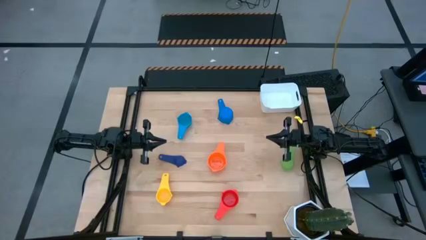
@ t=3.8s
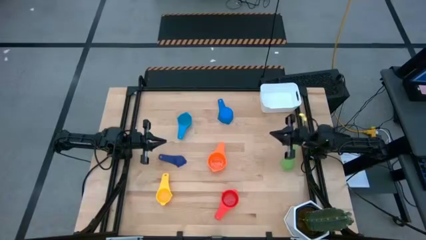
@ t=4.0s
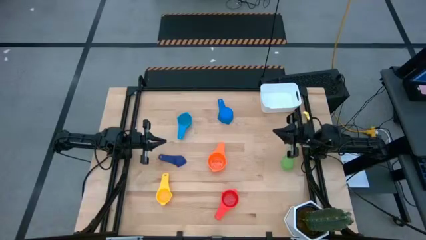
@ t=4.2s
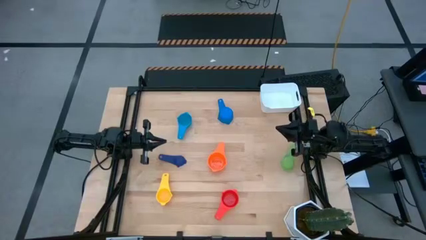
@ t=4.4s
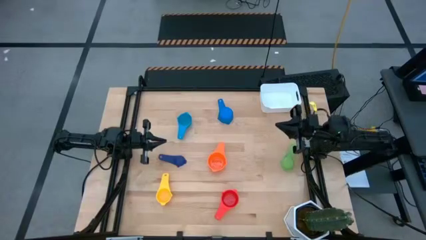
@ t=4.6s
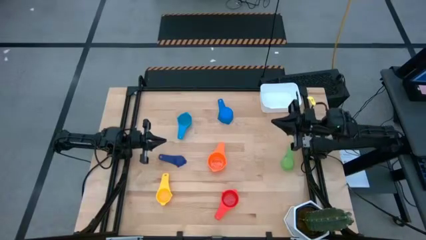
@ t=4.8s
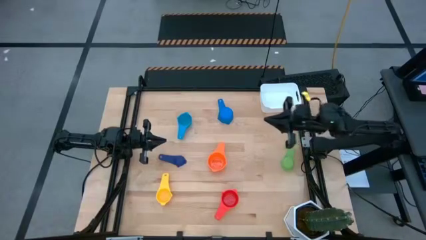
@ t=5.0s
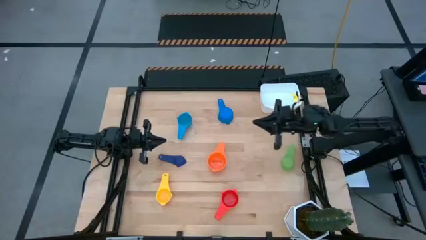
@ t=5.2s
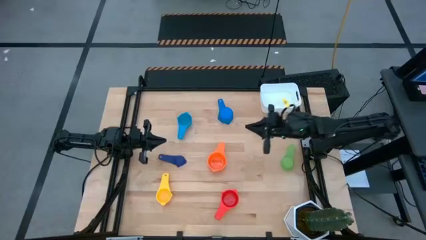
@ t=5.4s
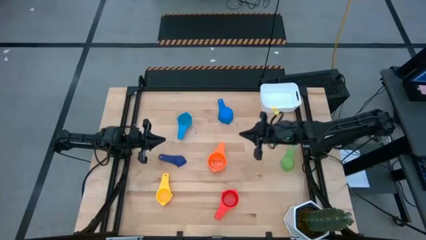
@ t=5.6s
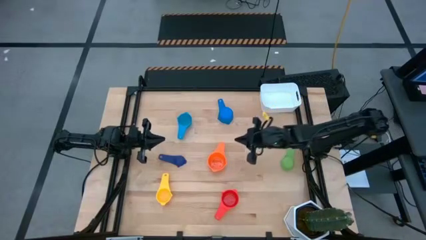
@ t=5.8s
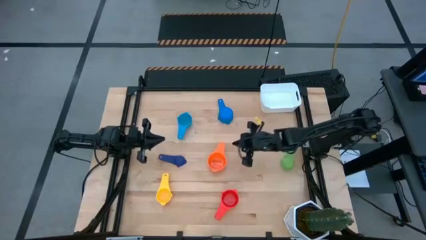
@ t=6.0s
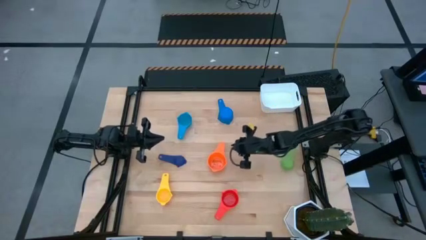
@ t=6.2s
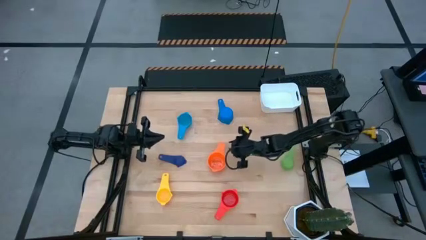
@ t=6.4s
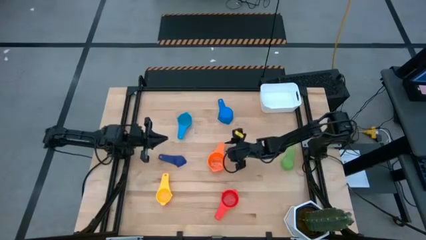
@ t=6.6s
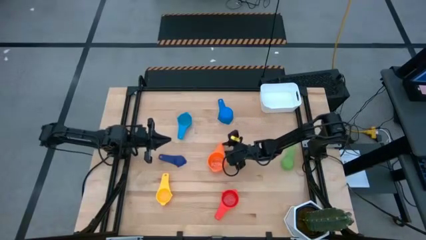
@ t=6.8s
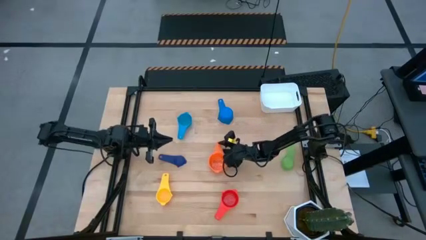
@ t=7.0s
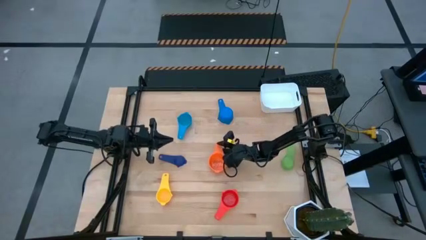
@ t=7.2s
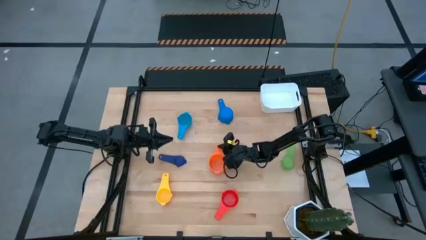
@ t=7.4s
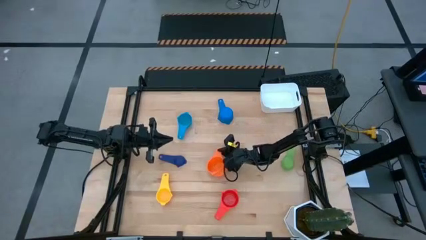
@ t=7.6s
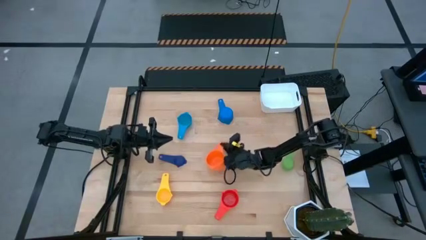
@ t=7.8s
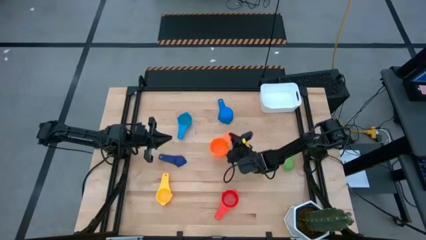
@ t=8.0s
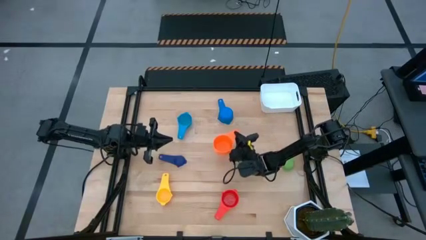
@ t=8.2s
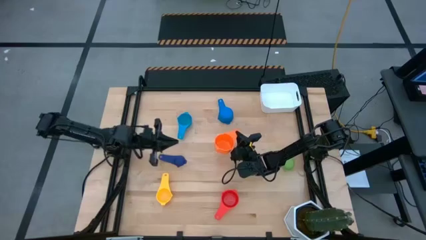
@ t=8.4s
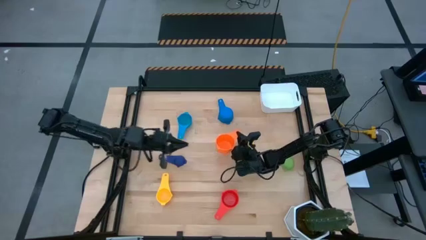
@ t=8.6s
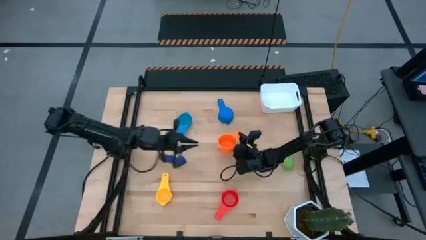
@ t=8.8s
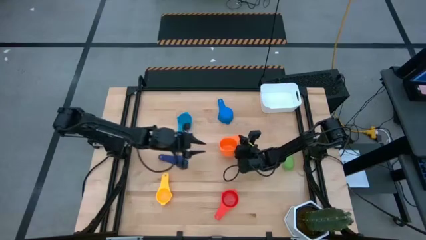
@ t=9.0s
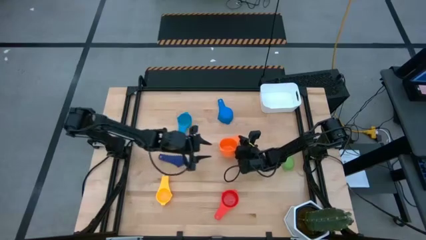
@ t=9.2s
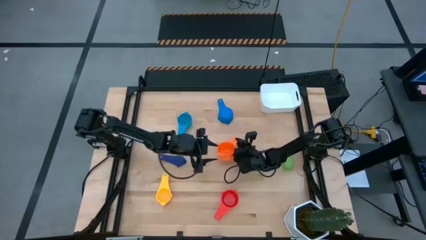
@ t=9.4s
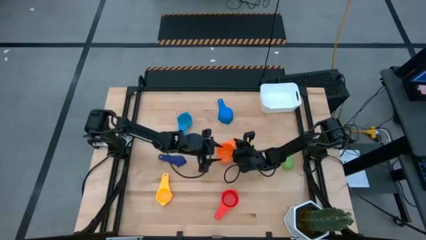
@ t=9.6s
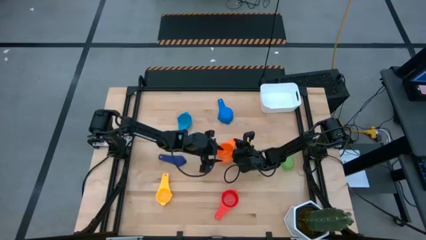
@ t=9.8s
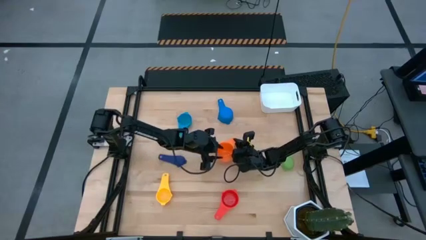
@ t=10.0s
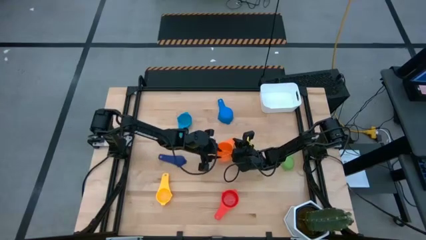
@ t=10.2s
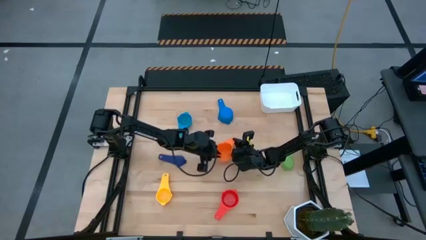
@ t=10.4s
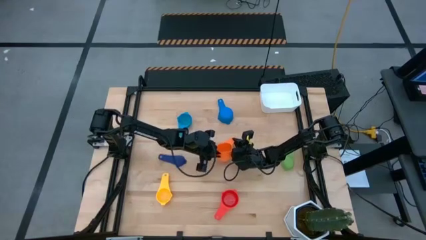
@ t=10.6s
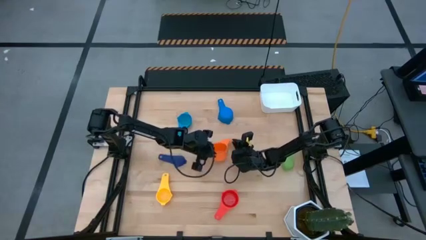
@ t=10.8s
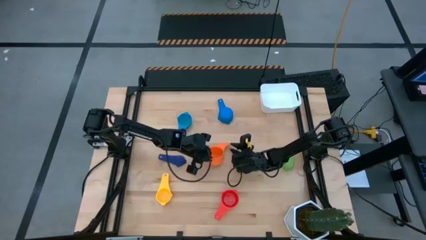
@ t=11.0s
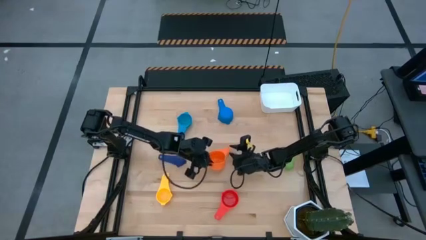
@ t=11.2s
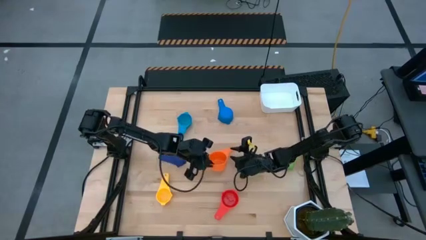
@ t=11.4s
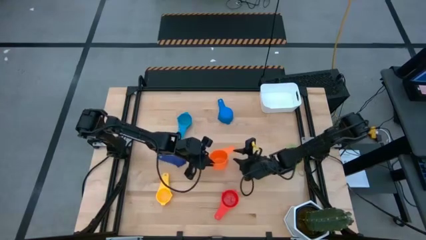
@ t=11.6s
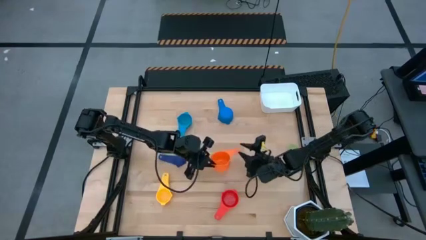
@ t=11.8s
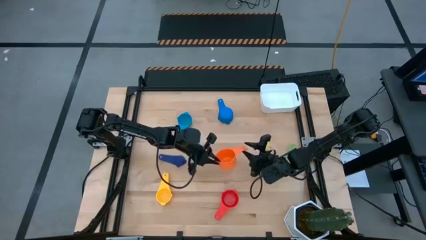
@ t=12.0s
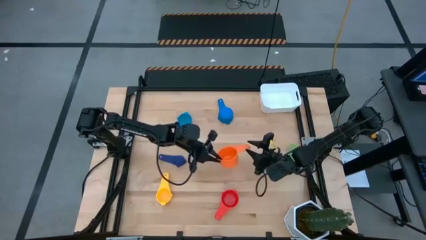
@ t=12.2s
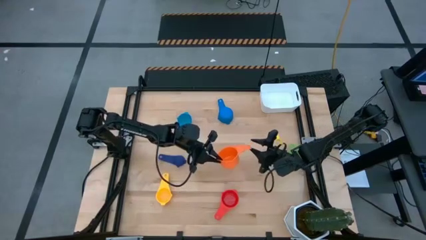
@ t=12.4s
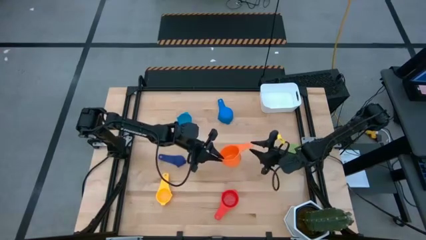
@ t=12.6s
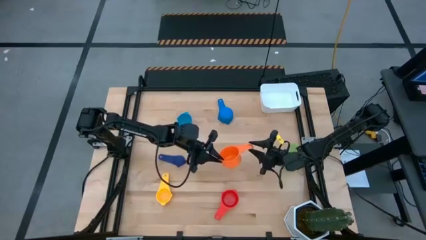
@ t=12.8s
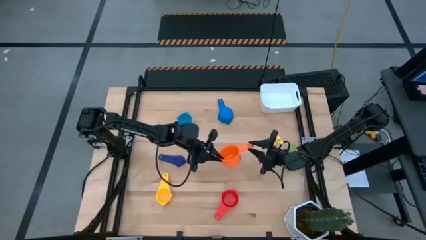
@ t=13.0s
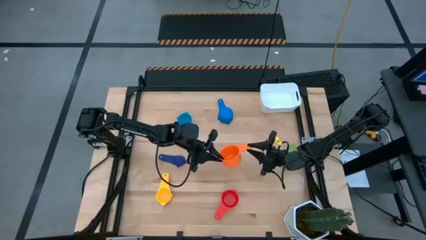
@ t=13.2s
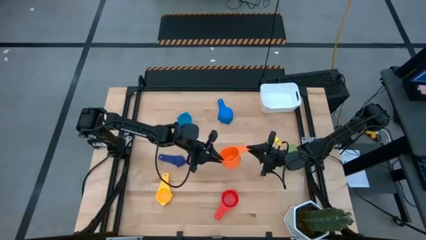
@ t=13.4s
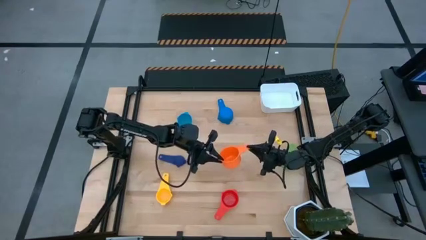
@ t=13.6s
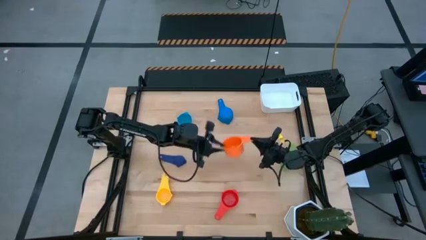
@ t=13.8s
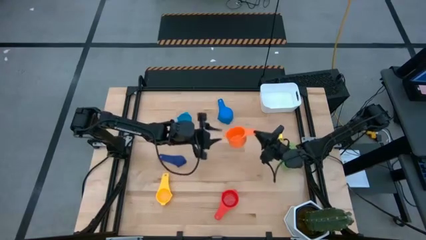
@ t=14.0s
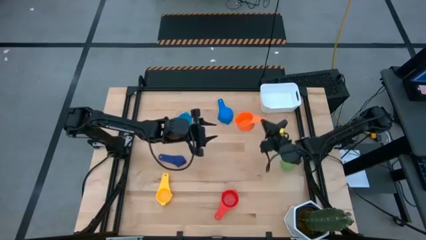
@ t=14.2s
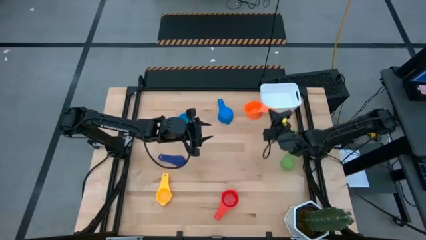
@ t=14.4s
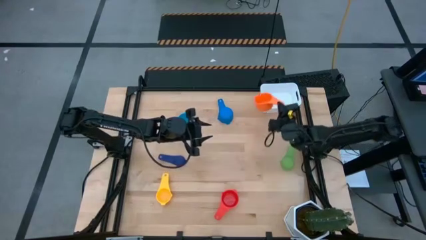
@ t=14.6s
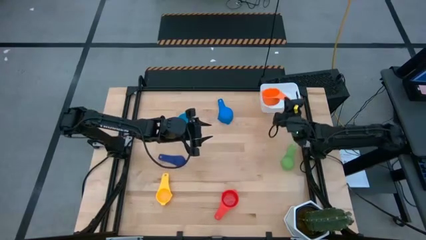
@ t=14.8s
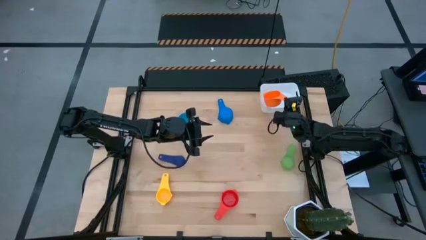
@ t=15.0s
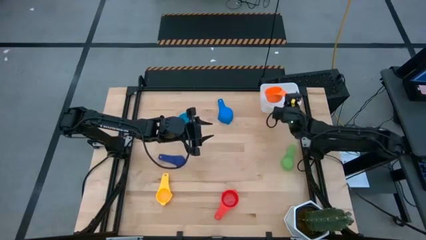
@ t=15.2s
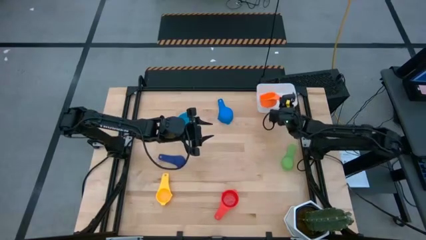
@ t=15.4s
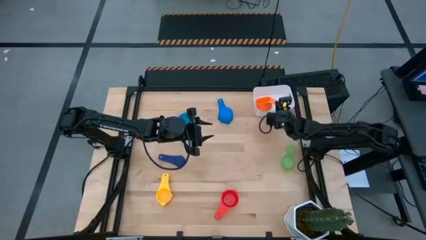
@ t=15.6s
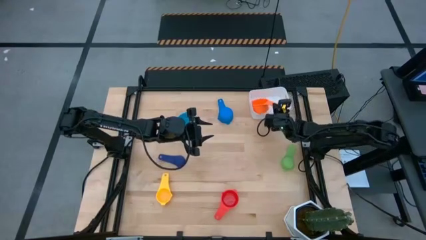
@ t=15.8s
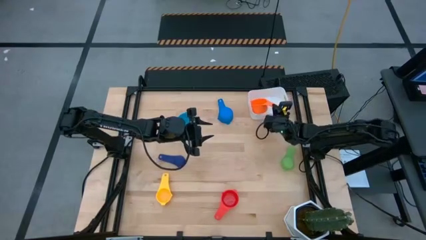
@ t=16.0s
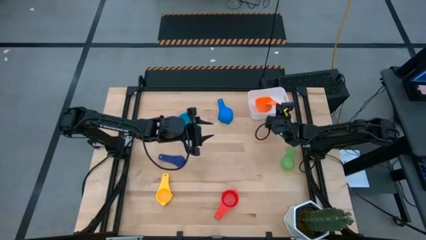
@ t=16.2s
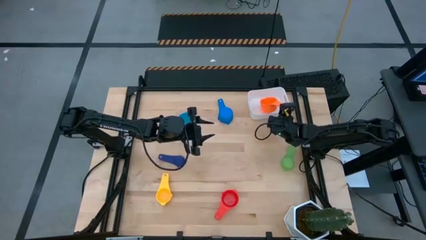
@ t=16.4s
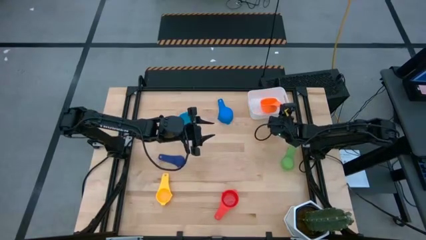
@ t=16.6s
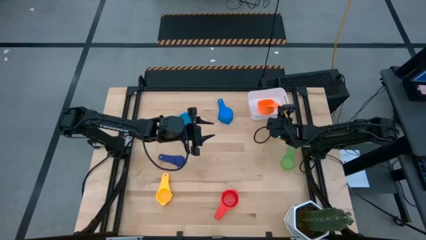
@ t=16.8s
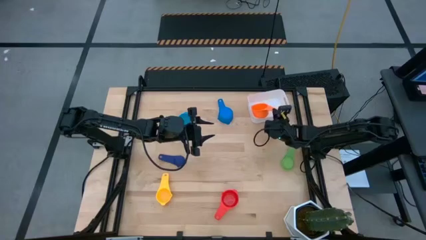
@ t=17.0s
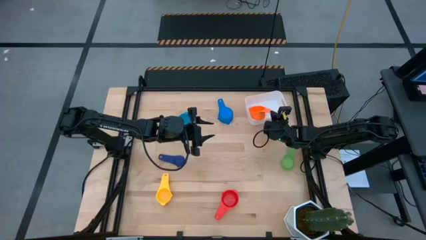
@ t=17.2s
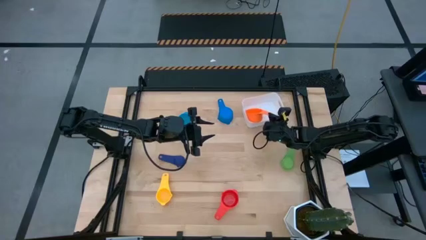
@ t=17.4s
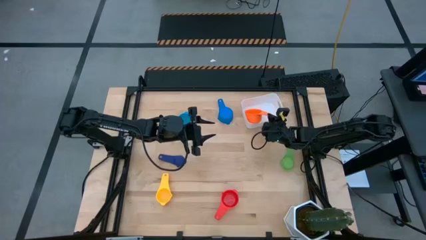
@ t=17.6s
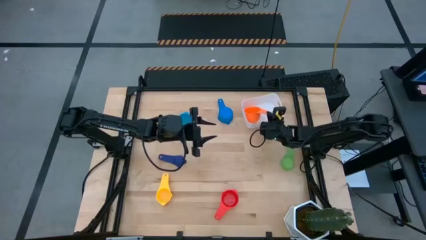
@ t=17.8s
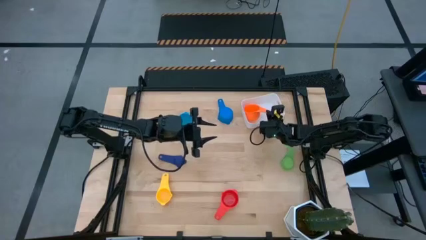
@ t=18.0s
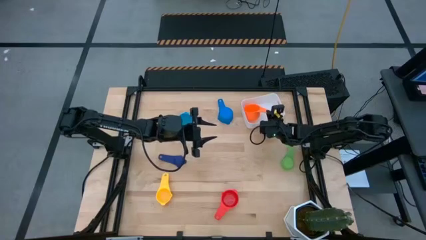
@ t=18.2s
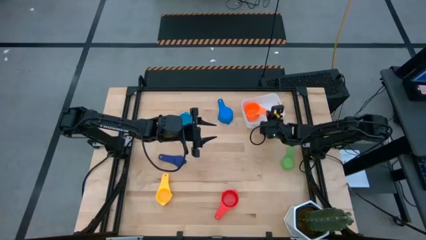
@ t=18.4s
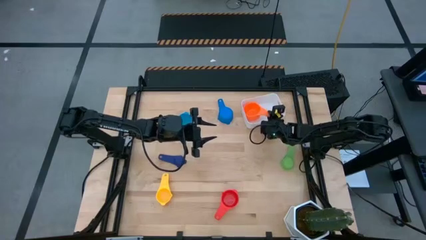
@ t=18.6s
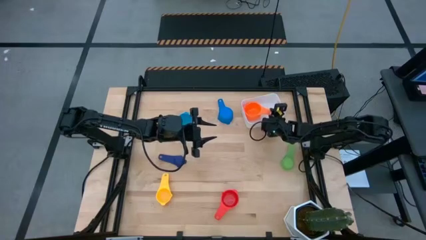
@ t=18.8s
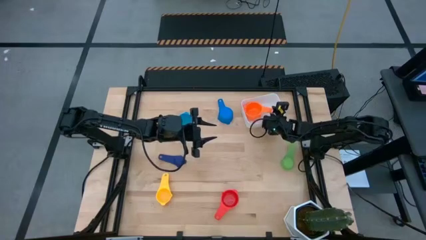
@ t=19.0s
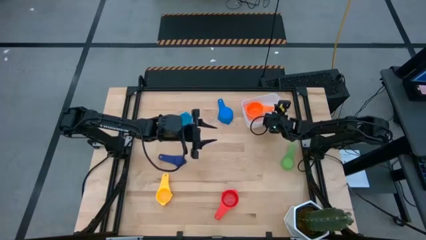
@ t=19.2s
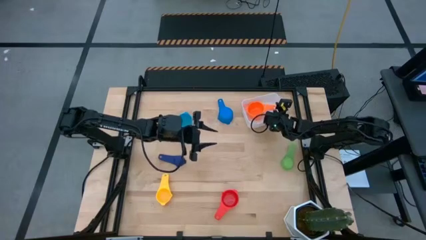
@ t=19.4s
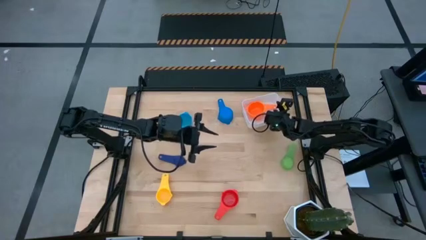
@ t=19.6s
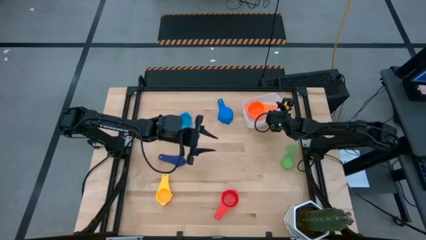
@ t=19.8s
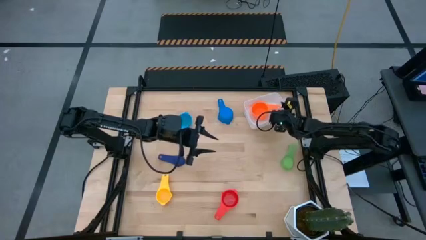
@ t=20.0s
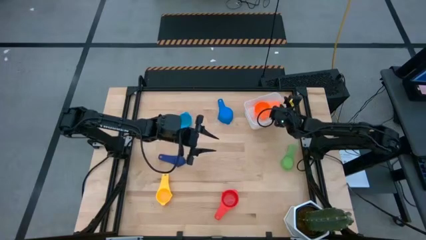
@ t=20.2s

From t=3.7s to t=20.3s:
Task: Nest measuring cups in basket
Put the orange measuring cup into the white bin

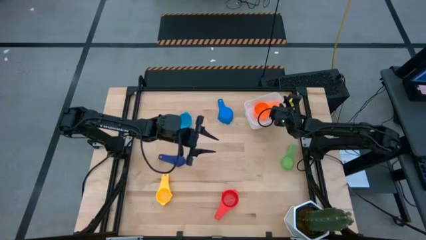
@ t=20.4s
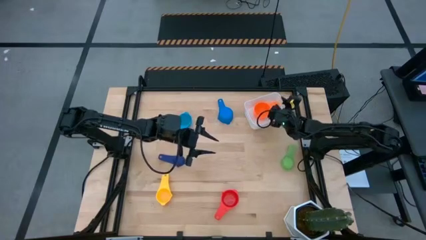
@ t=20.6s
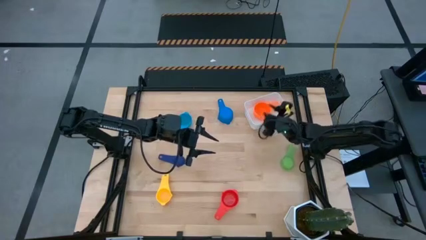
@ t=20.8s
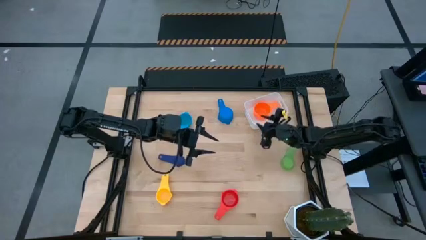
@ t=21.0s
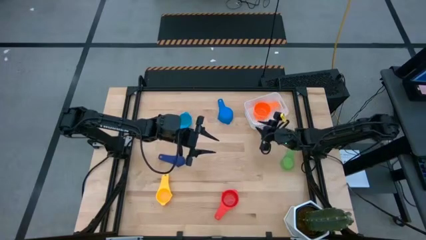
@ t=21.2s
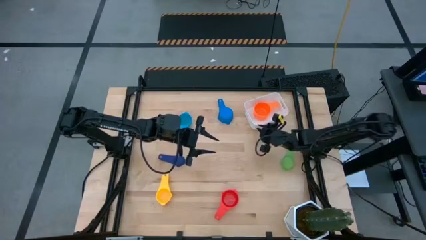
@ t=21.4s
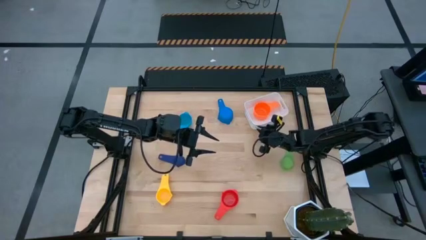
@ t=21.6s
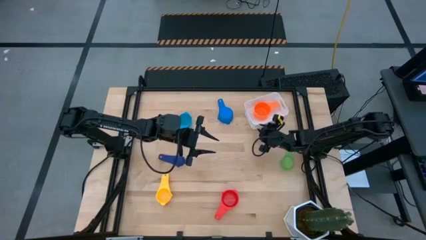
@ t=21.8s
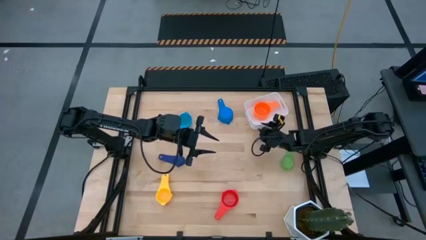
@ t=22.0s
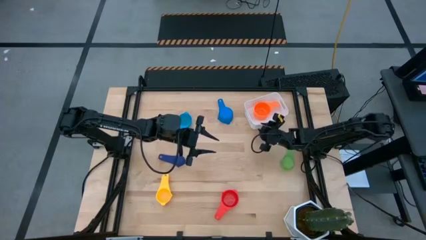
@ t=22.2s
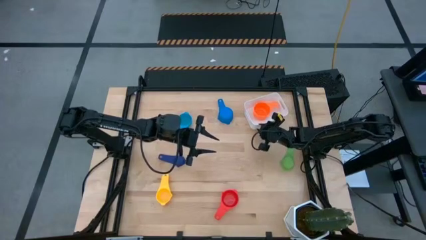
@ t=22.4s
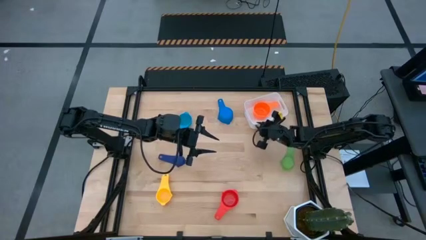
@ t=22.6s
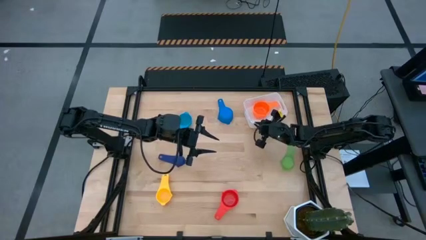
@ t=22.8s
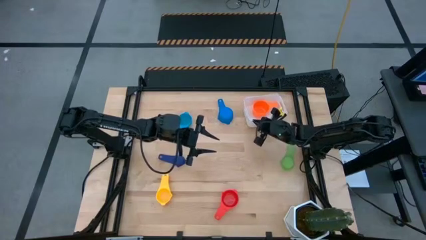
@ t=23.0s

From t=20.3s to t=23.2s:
Adjust the white bin
